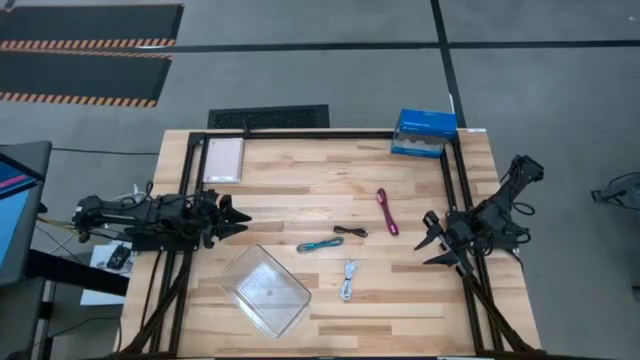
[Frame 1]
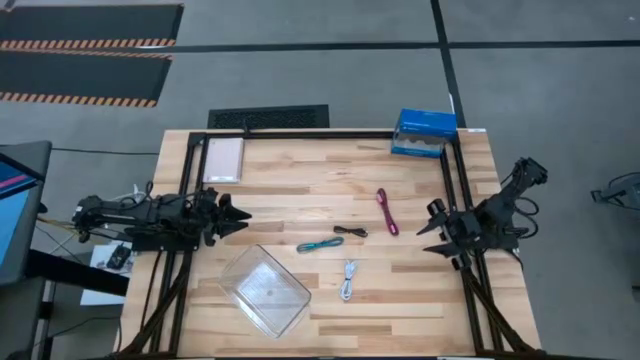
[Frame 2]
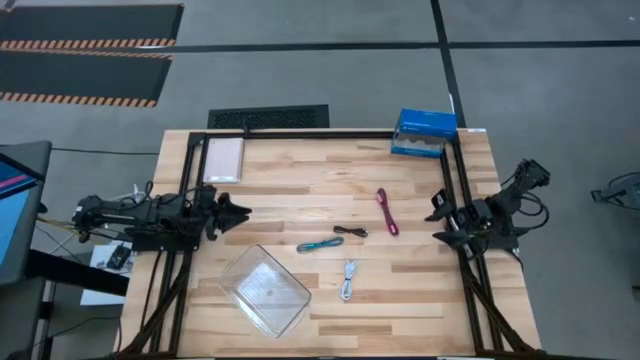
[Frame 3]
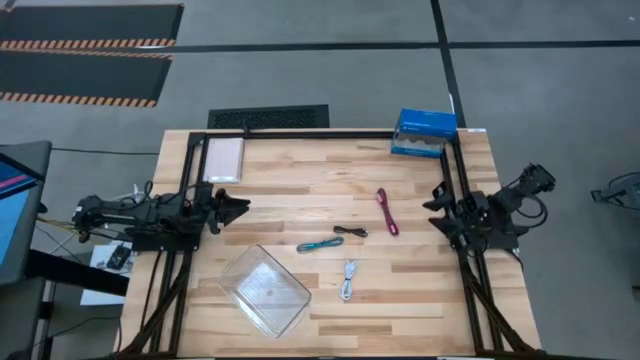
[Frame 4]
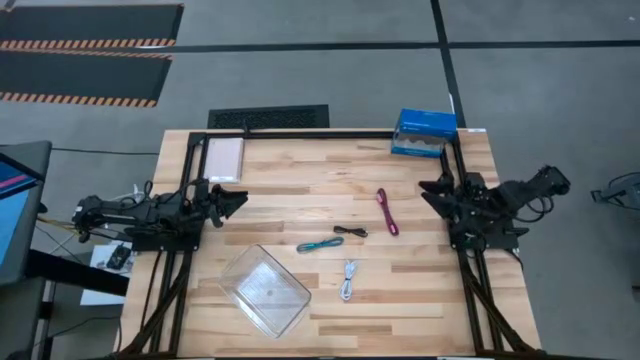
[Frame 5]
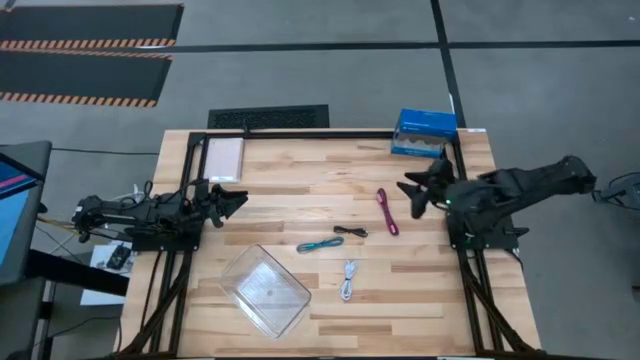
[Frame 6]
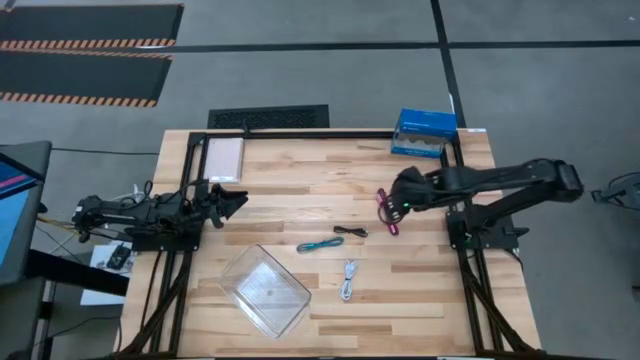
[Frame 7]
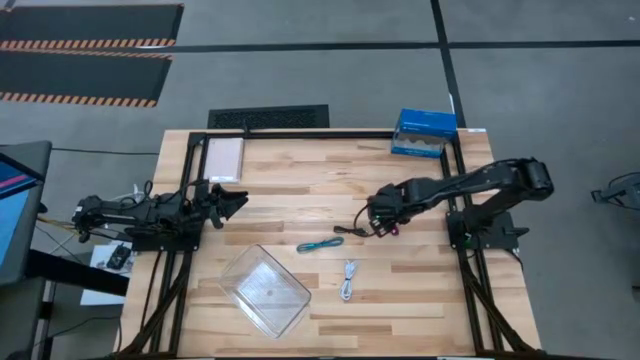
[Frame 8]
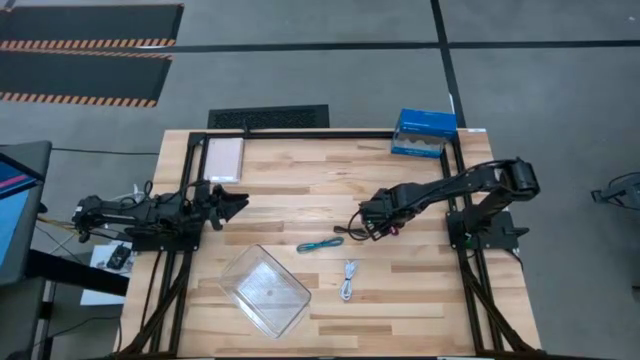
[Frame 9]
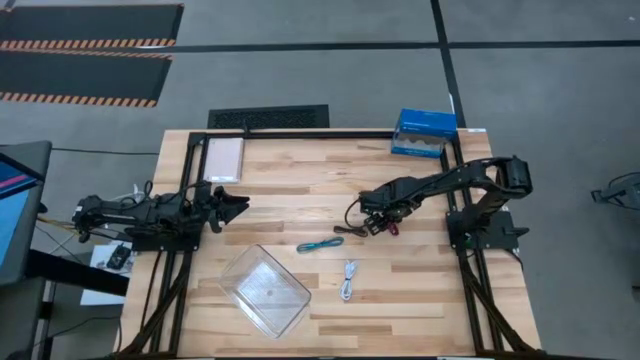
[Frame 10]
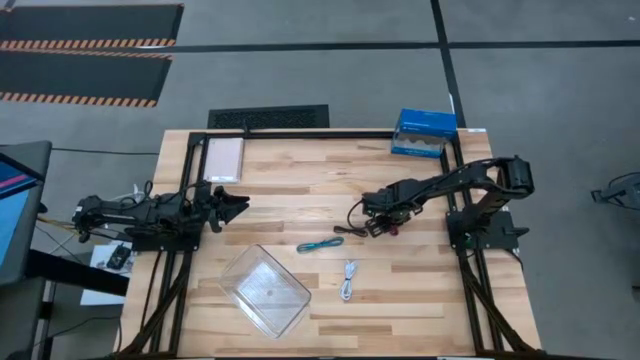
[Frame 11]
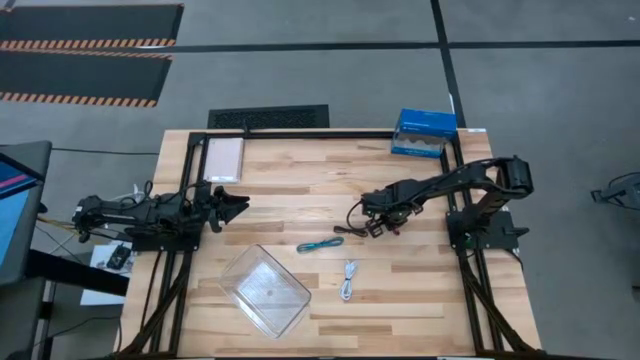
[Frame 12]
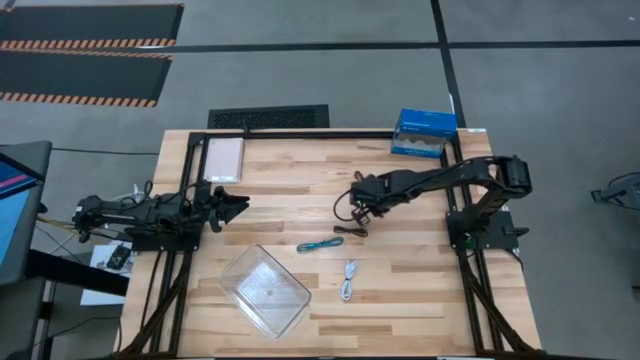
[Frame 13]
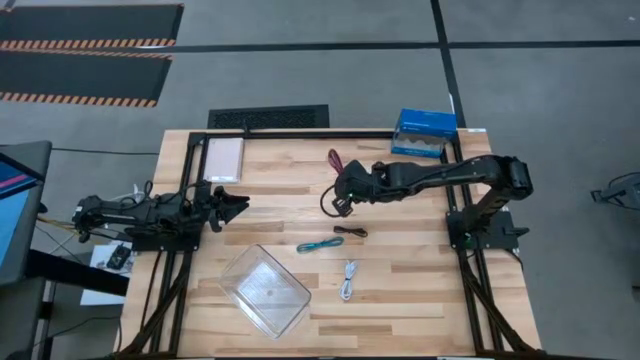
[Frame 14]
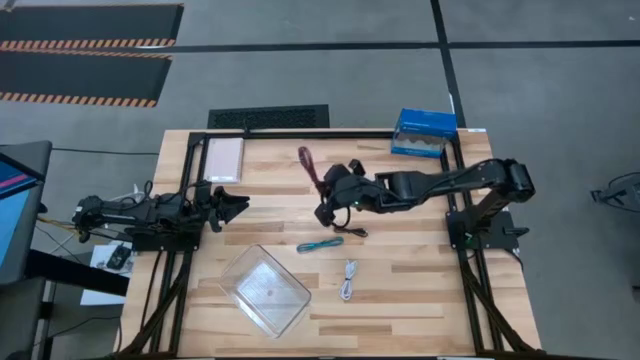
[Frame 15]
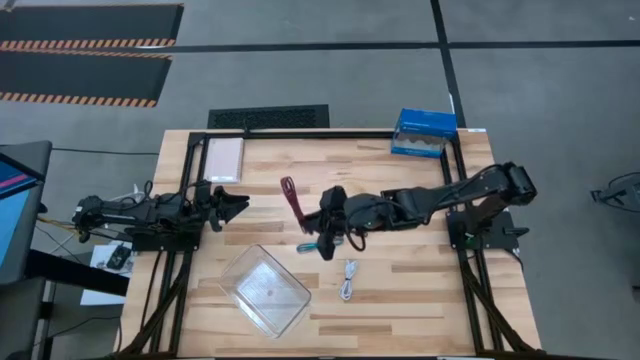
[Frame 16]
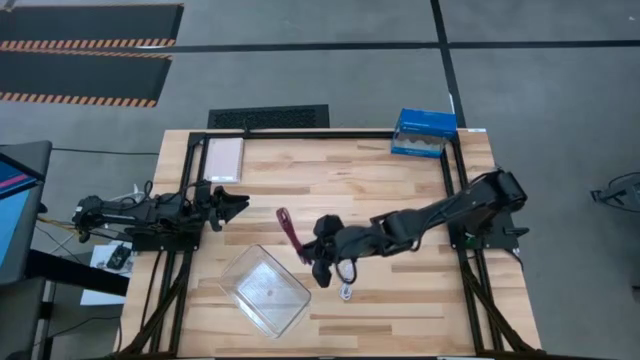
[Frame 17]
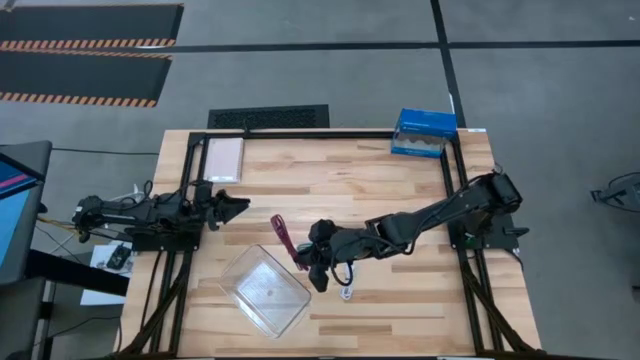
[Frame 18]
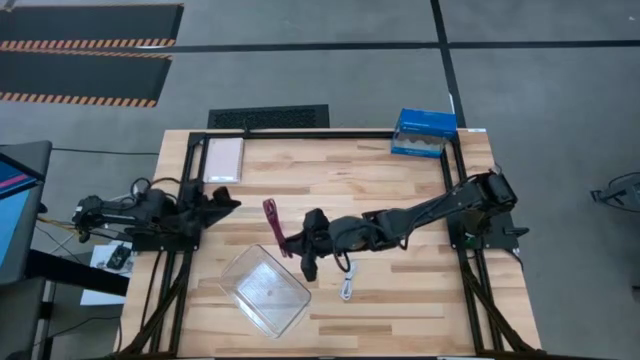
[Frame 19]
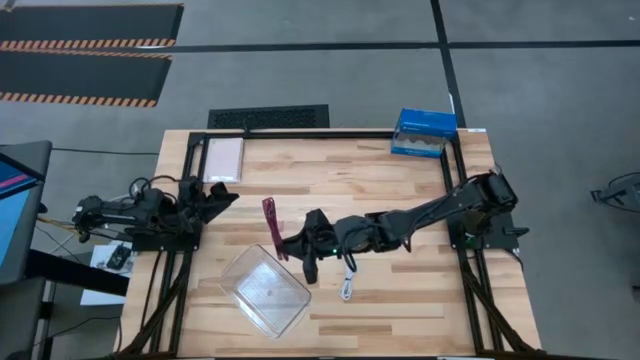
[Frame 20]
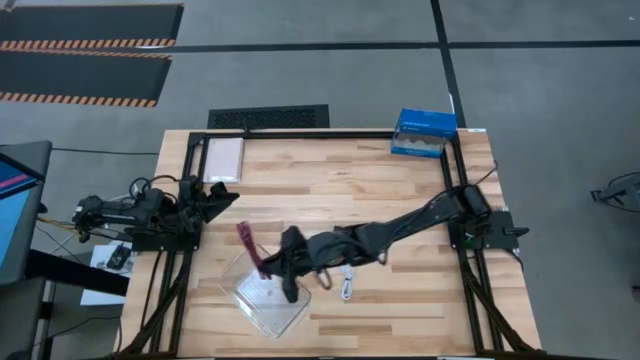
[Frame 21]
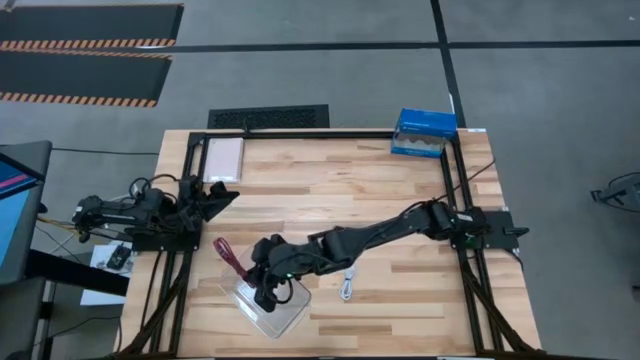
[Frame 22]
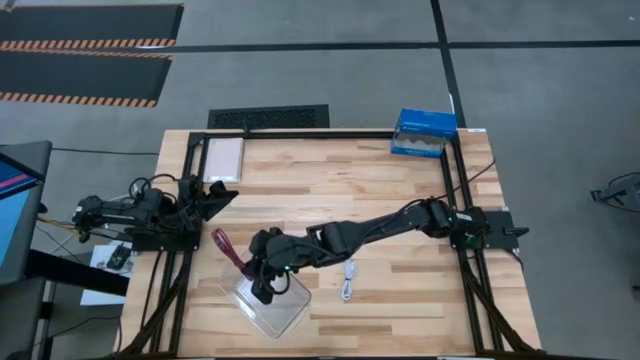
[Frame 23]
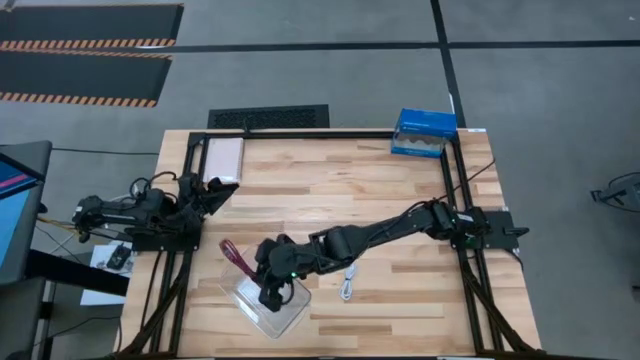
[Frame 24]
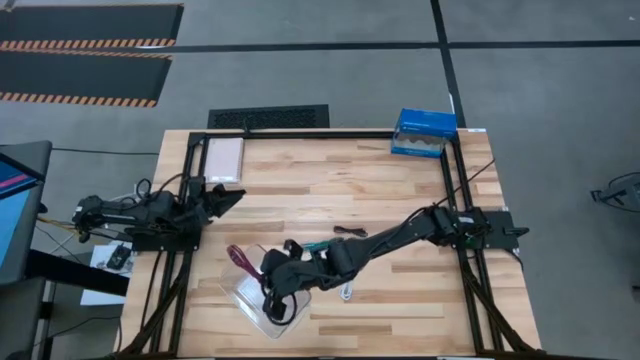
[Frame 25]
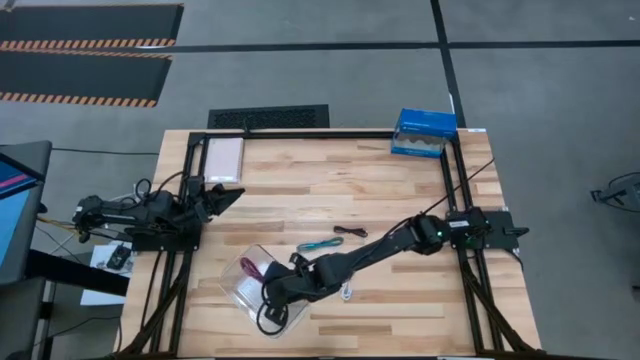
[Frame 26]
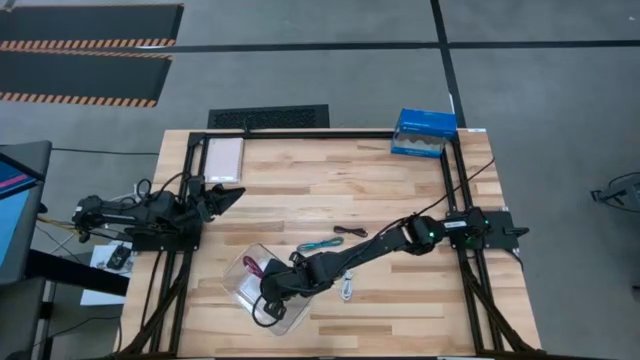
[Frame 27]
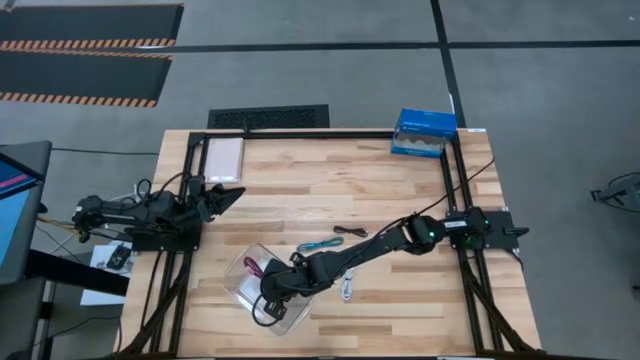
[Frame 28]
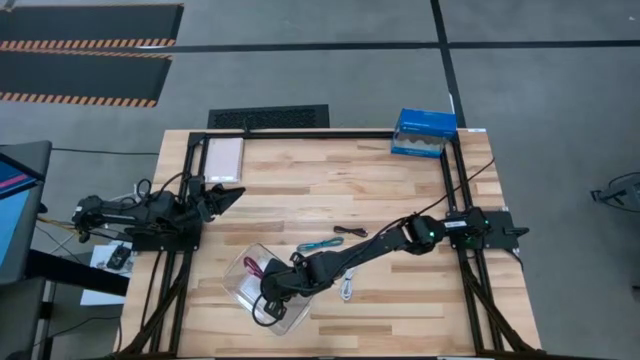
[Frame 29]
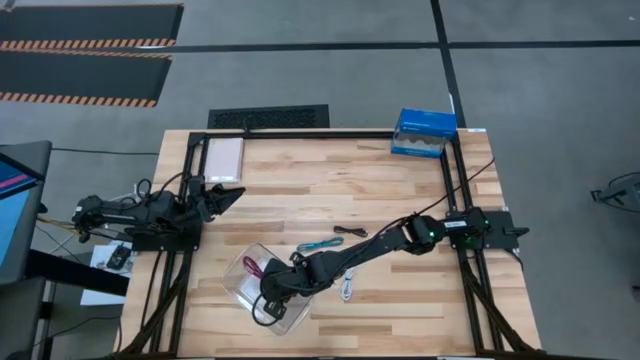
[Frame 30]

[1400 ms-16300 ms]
Task: Pick and place USB-C Cables
Put the pink charger cable into the transparent bin

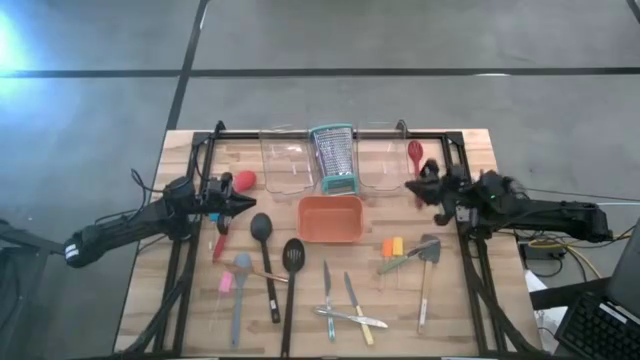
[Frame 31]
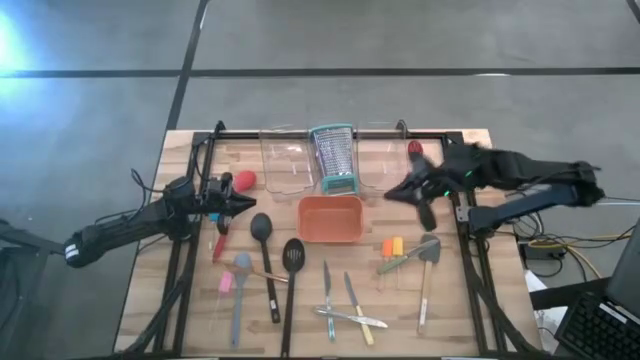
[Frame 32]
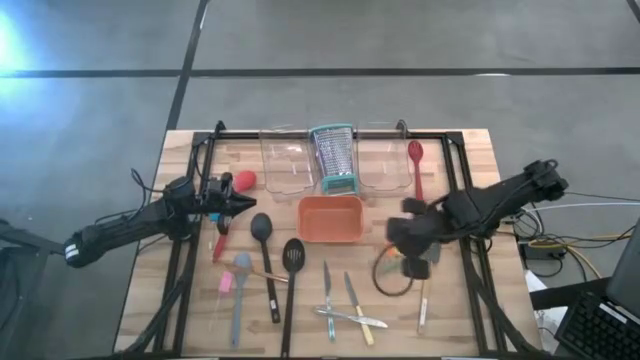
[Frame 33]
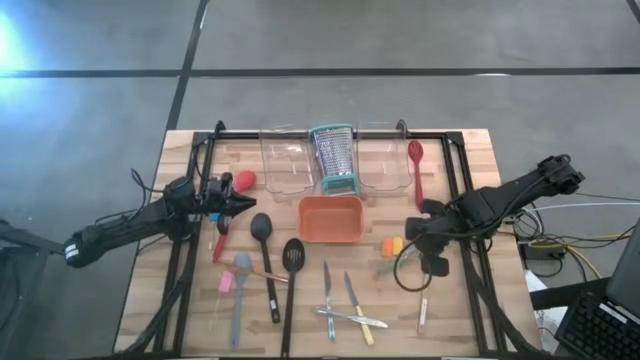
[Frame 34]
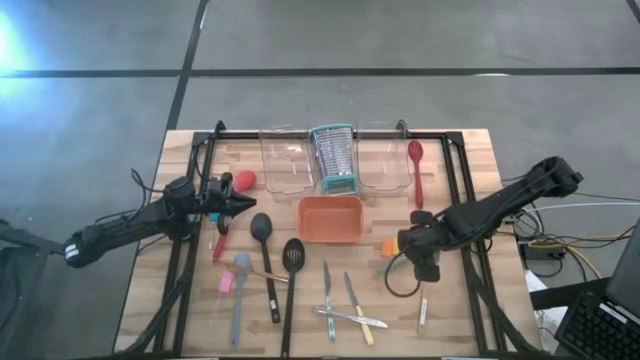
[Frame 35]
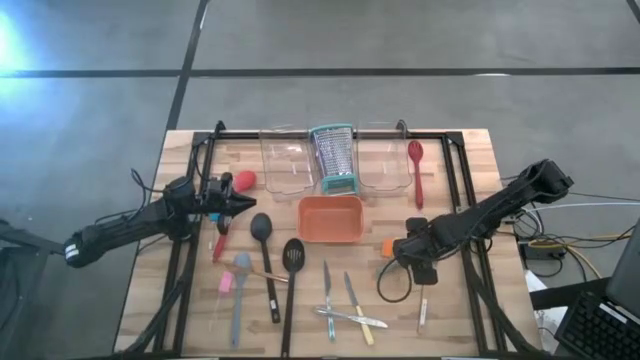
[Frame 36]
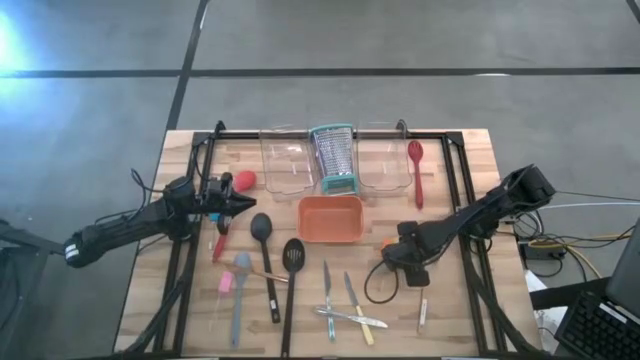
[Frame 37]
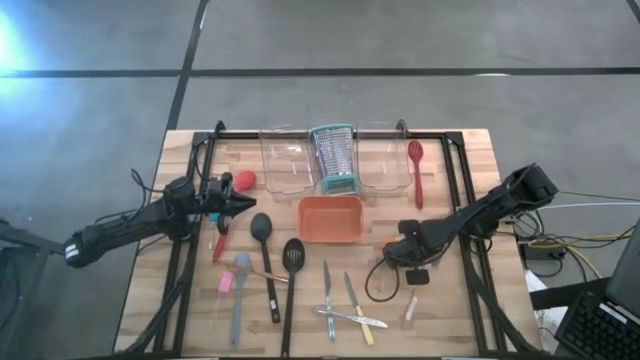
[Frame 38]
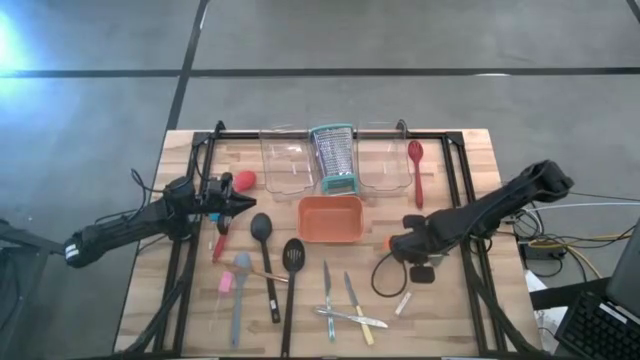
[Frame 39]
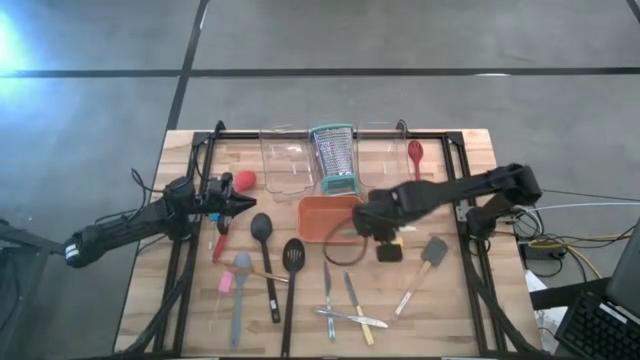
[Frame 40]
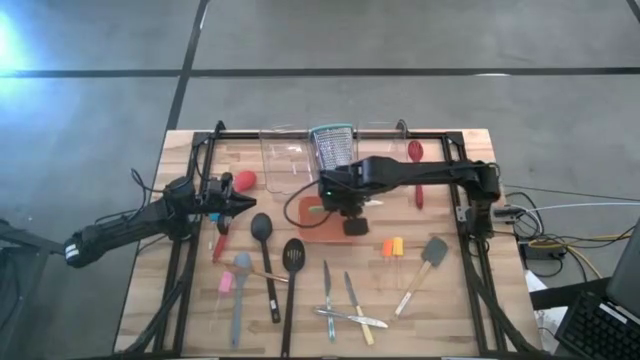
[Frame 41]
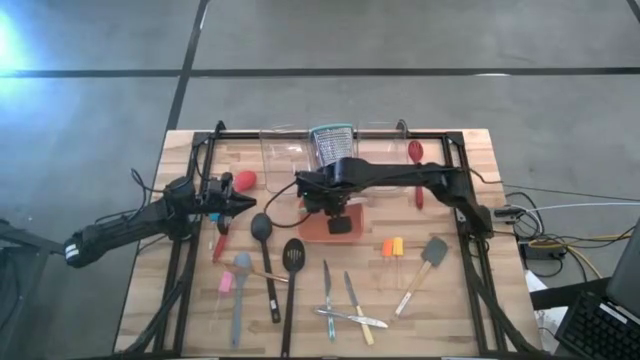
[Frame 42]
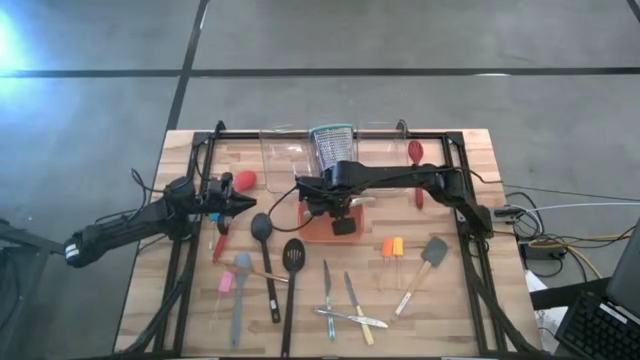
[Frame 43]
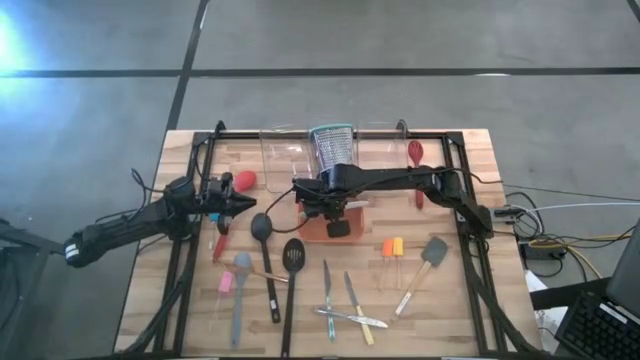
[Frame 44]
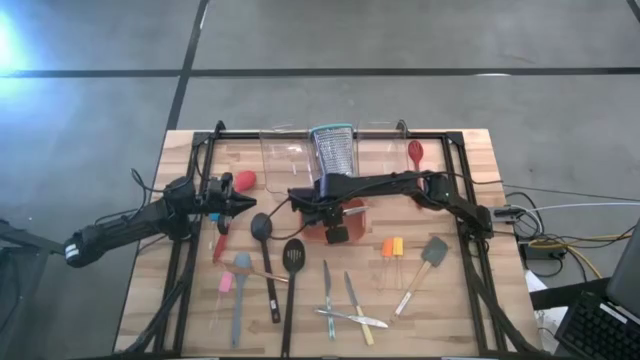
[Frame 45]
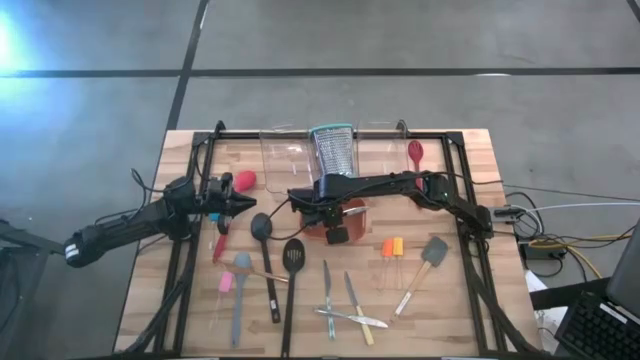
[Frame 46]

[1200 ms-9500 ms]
Task: Pick & Place Kitchen Items
Put the green knife into the orange bin
